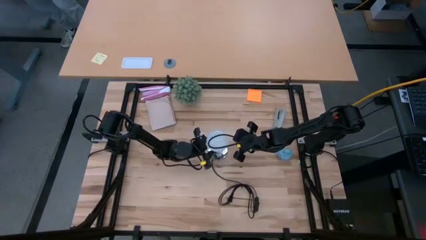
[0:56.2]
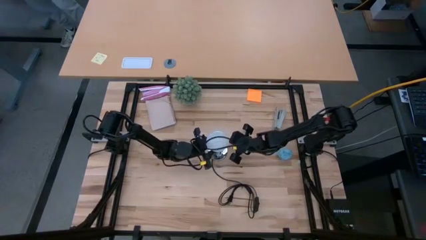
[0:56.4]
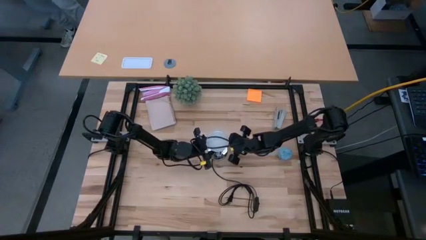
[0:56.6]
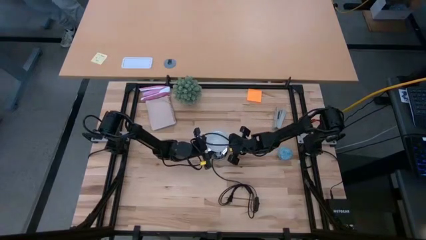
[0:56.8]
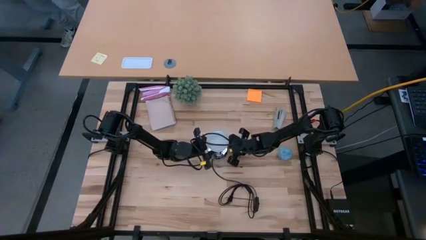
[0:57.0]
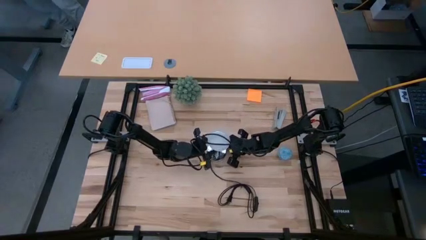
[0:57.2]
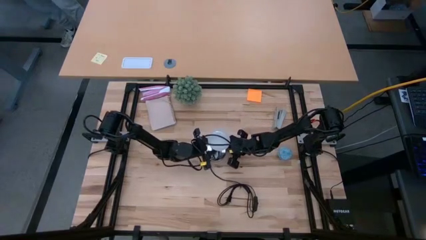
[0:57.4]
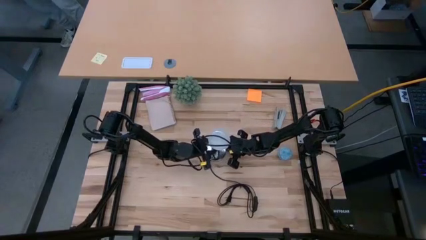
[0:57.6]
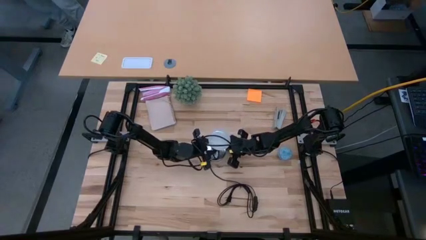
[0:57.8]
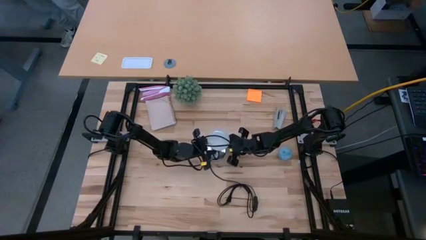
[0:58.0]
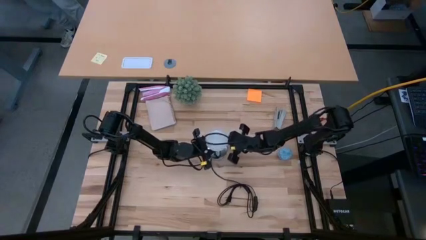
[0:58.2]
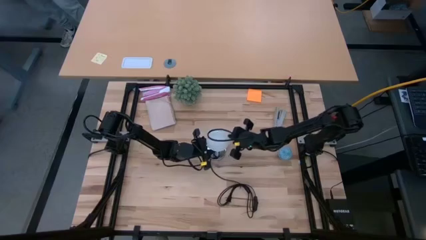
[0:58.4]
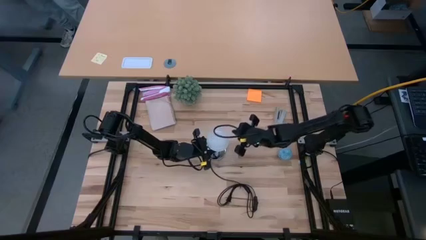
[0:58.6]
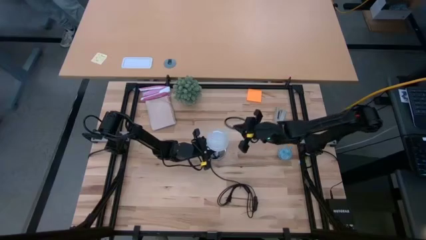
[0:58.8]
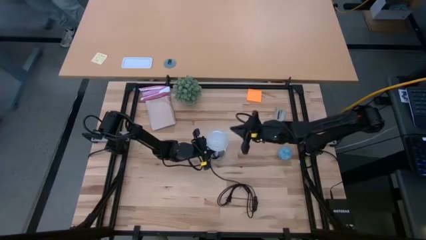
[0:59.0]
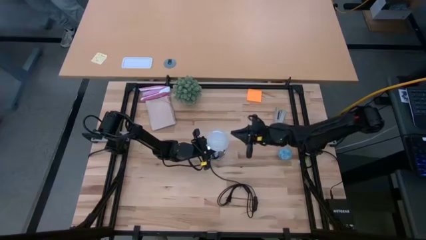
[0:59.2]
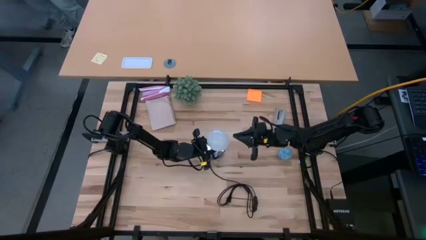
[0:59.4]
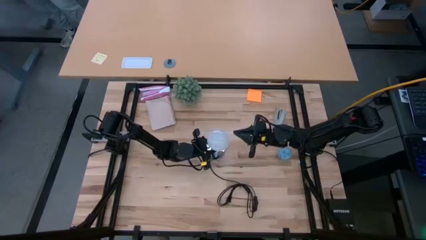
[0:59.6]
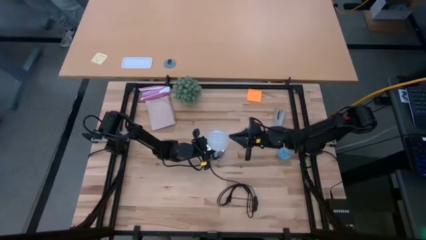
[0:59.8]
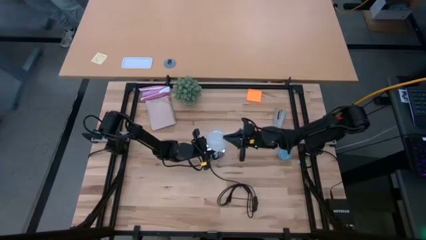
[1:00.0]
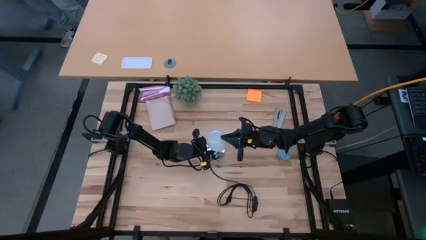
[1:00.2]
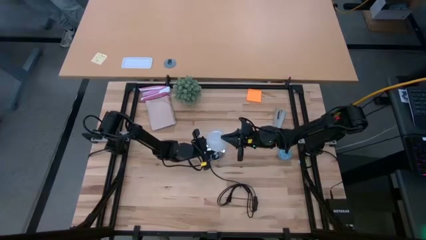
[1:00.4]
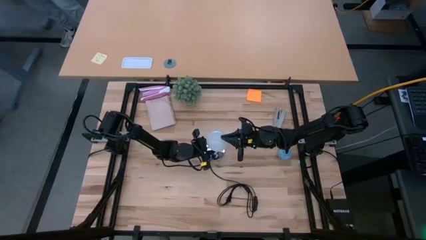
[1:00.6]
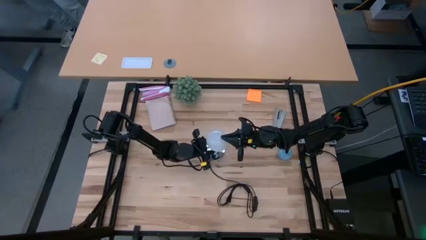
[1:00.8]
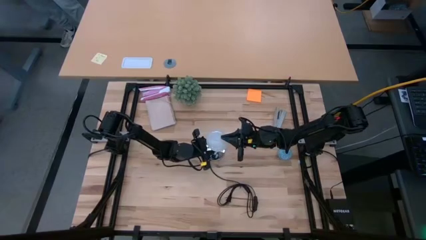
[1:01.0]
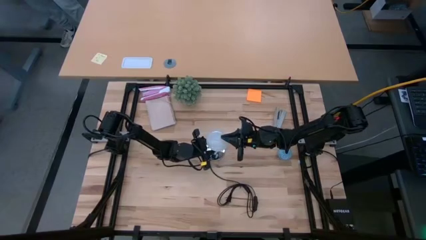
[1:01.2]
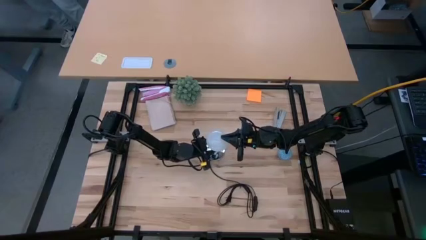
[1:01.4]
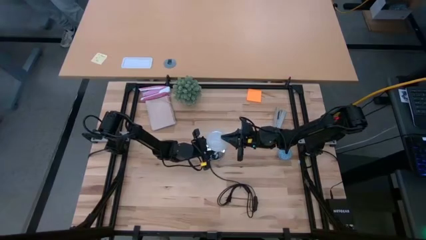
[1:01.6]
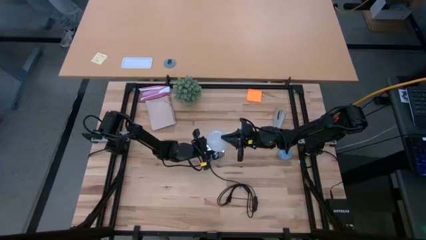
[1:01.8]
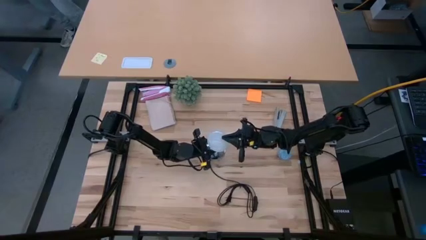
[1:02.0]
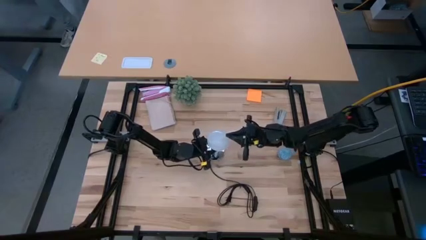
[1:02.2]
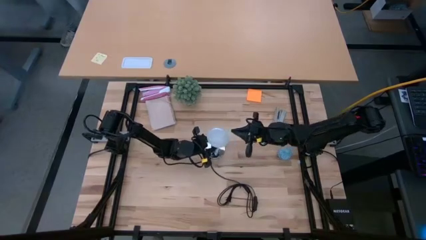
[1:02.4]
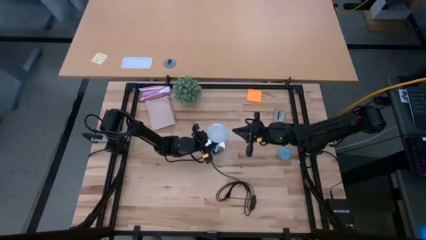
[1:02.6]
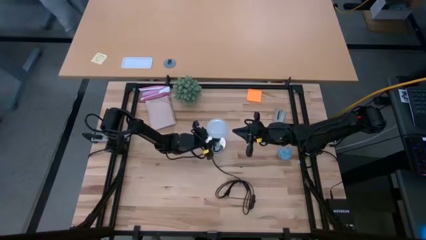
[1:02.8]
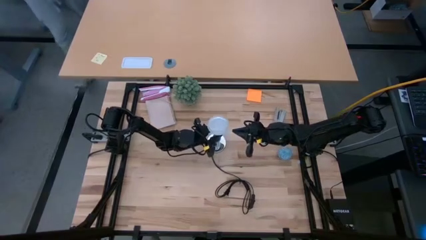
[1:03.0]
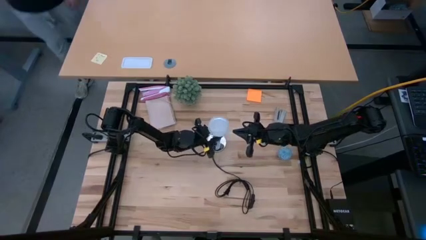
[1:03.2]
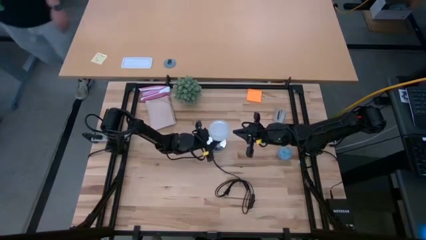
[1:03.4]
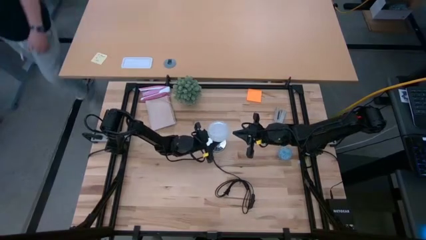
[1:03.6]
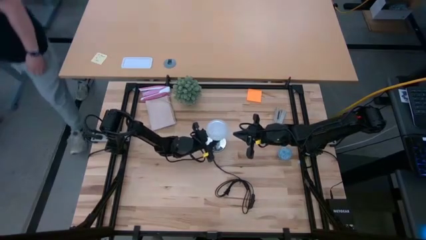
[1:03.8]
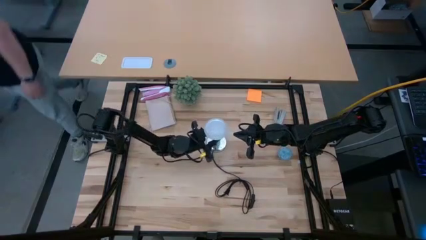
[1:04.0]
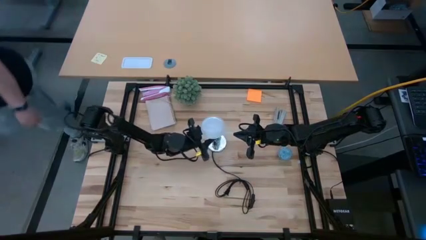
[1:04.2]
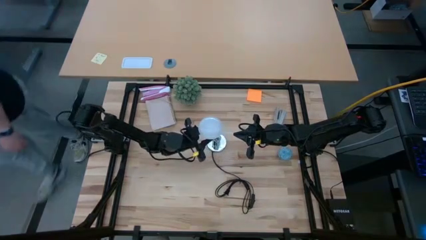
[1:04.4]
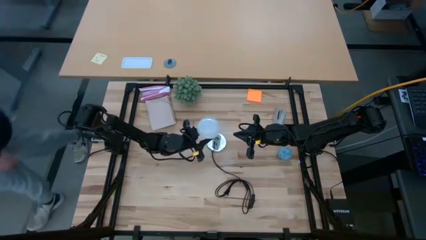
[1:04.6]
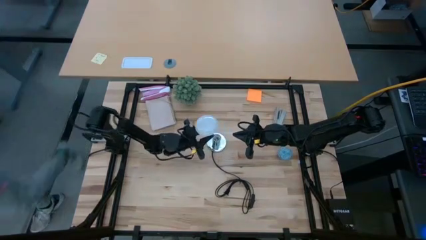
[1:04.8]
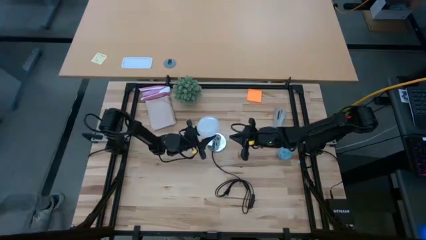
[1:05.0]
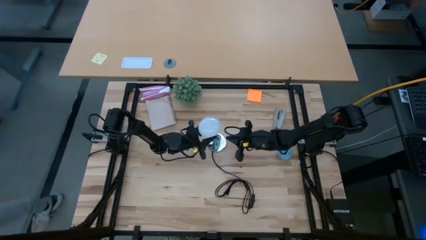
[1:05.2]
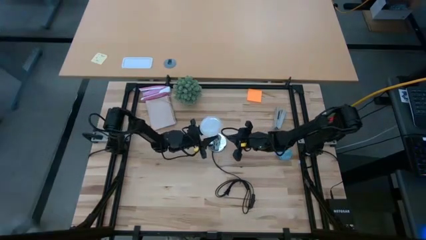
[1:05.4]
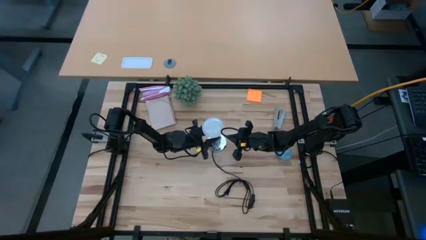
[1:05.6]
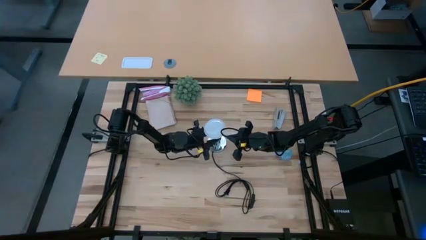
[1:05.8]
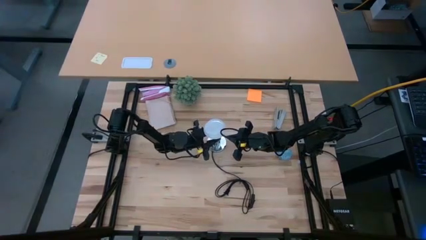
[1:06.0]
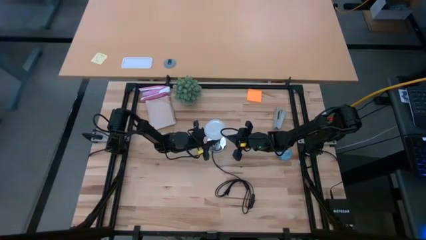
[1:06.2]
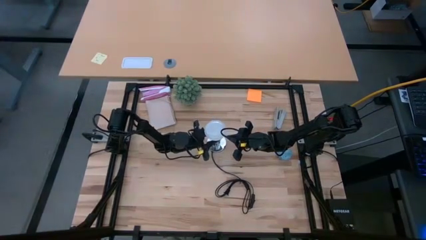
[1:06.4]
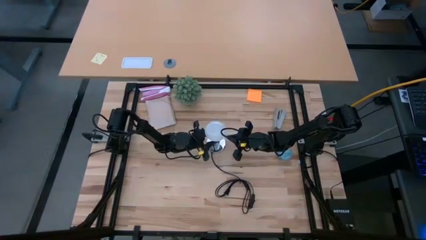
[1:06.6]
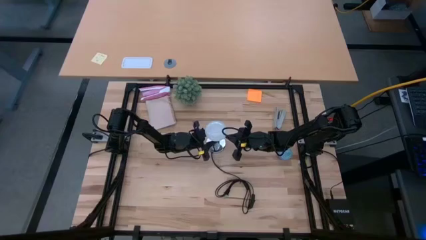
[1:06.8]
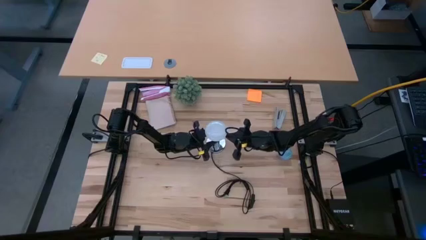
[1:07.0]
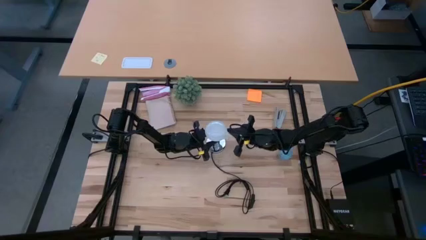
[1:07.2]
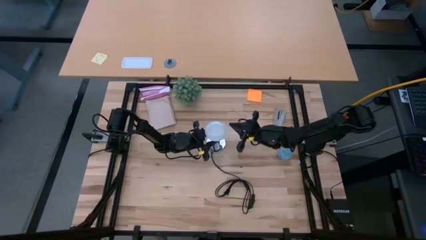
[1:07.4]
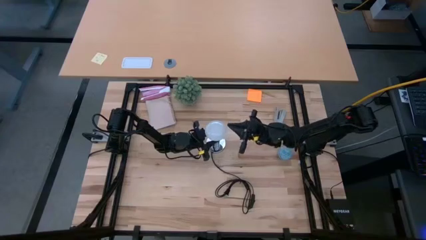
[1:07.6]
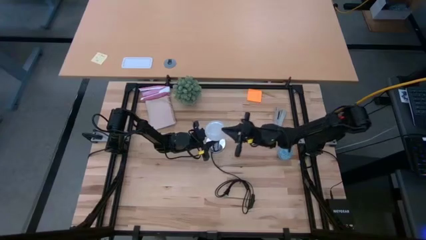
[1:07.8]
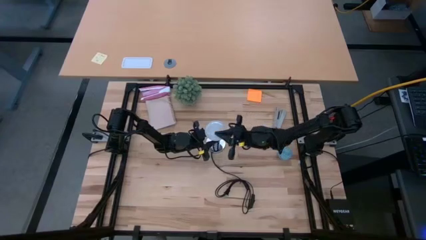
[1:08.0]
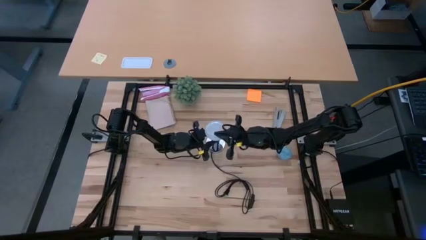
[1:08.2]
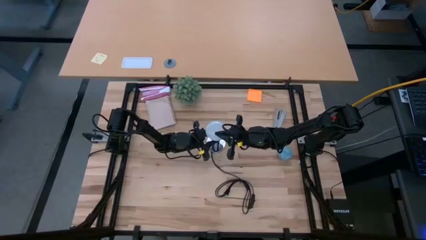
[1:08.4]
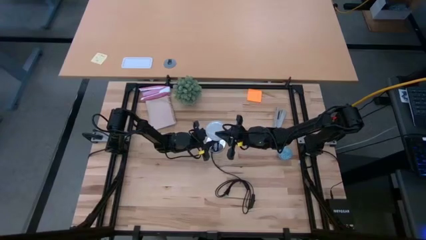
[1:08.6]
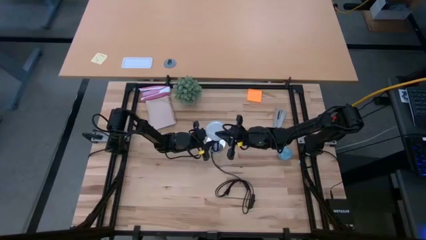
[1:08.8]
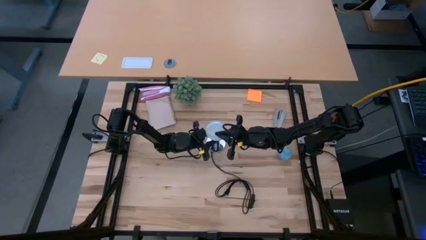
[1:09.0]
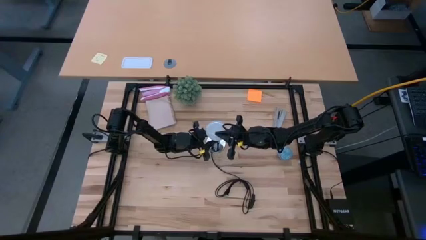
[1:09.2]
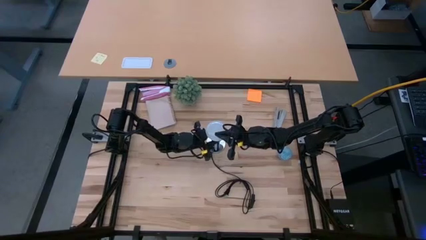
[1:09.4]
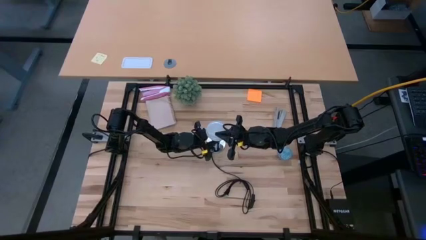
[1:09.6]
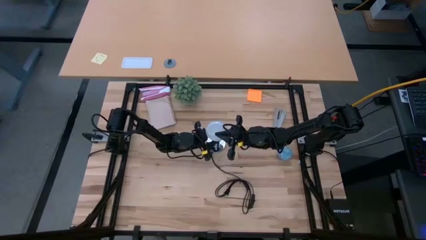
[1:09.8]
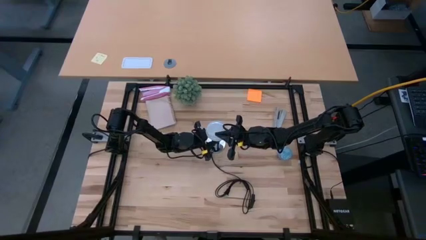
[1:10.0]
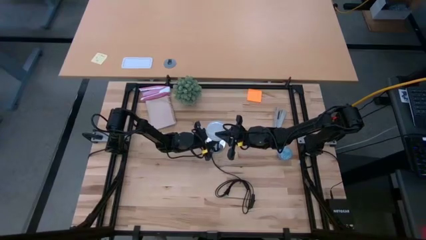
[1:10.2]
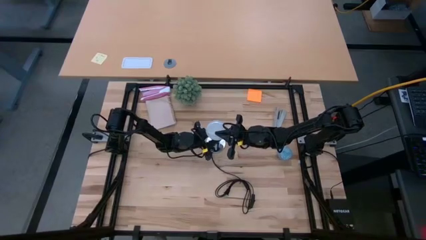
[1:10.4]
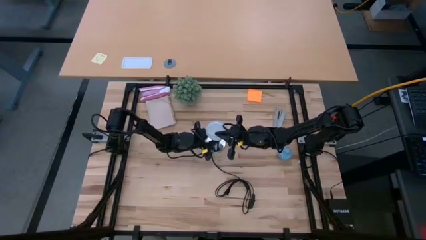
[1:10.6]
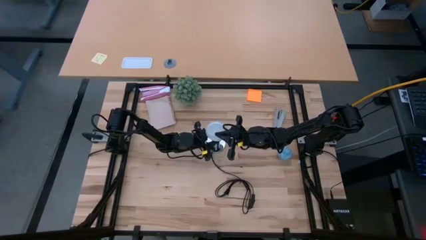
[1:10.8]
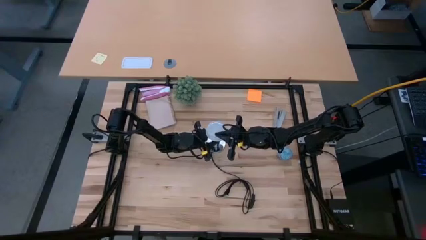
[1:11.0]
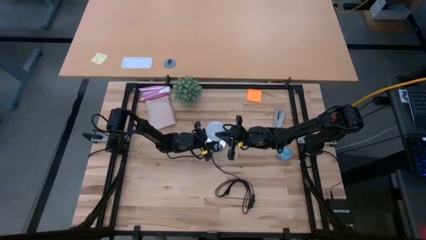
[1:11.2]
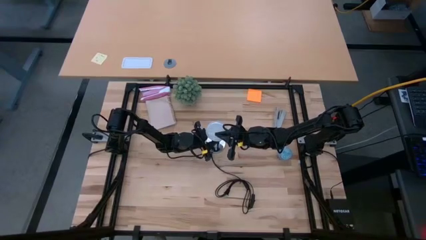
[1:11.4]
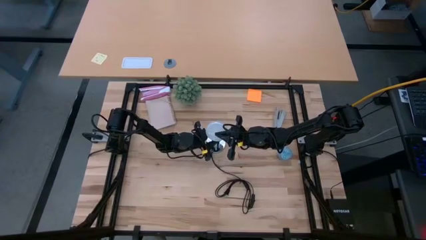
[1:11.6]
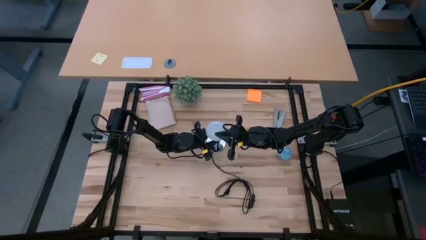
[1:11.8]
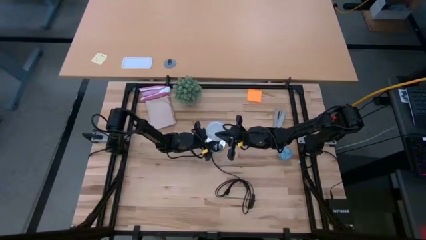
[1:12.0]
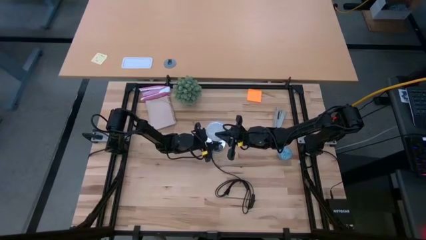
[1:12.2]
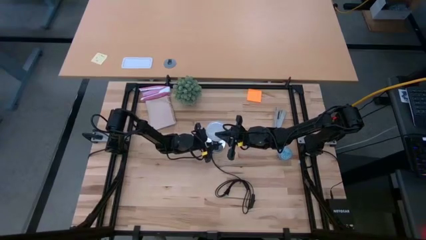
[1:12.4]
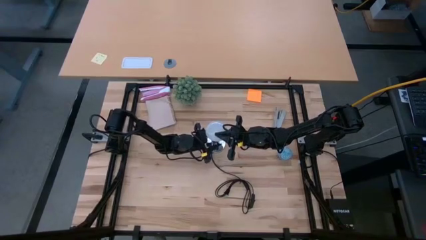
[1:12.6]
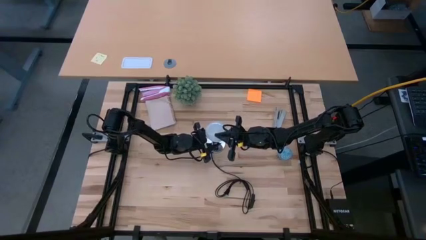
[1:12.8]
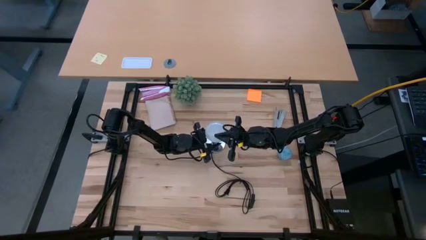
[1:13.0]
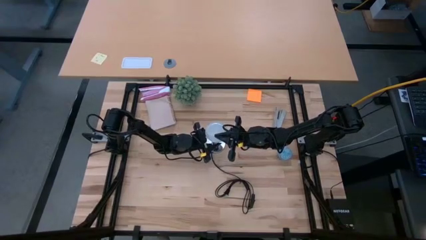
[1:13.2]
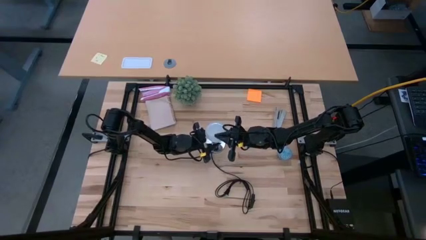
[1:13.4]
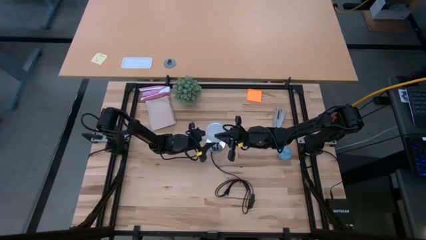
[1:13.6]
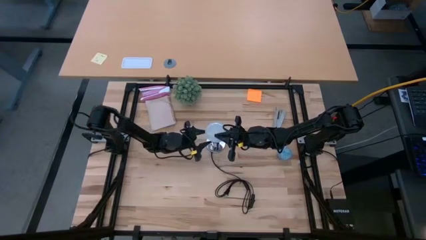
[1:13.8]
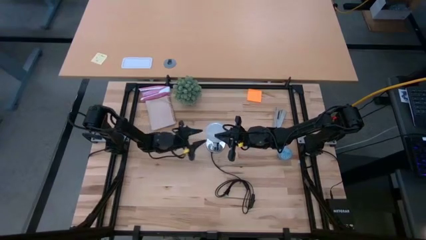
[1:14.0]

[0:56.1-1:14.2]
Task: Screw lightbulb
Insert the lightbulb into the lamp
